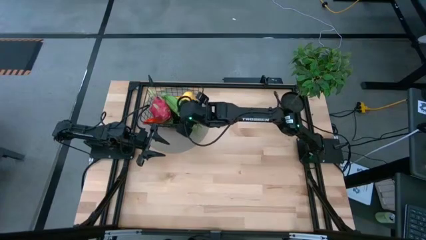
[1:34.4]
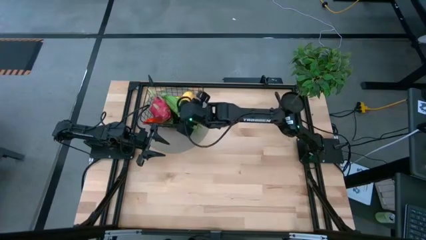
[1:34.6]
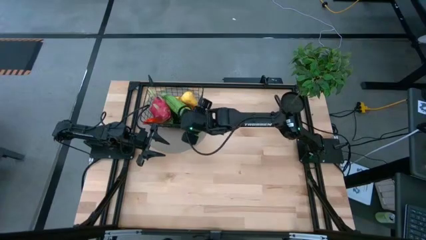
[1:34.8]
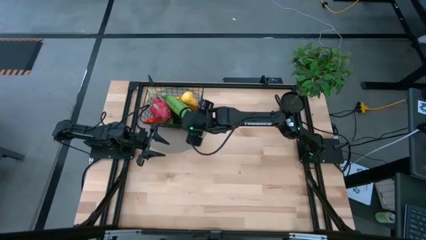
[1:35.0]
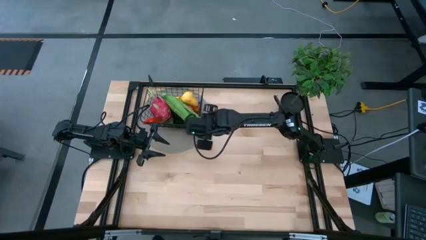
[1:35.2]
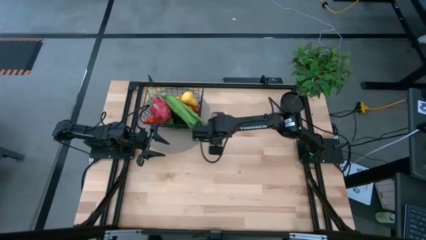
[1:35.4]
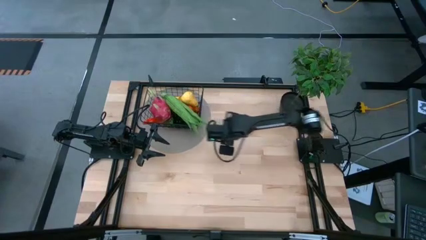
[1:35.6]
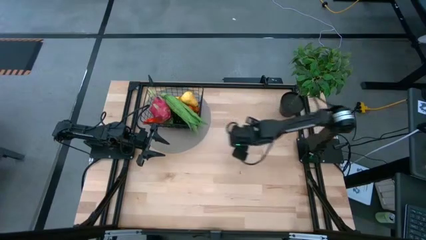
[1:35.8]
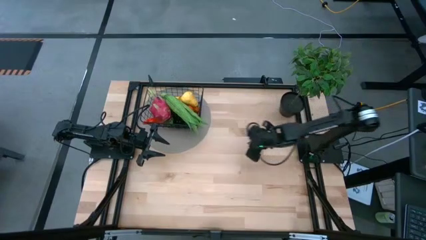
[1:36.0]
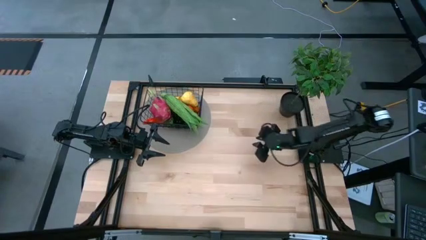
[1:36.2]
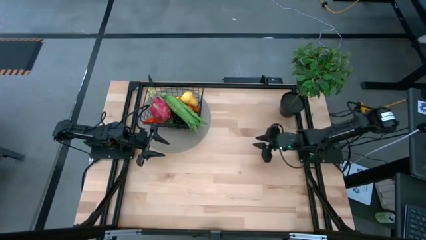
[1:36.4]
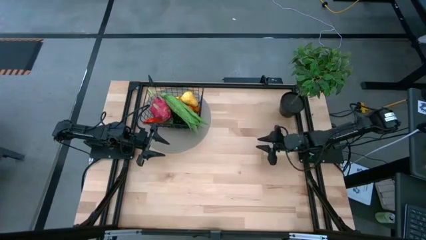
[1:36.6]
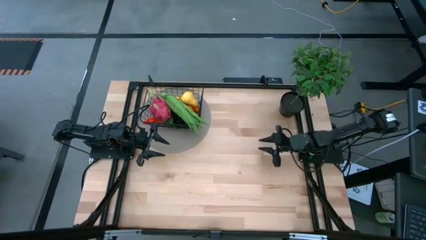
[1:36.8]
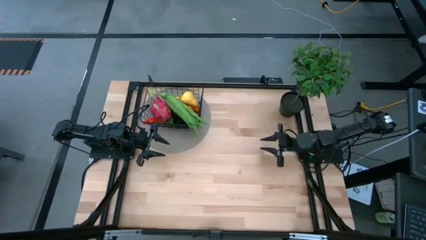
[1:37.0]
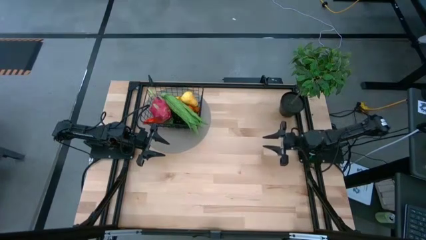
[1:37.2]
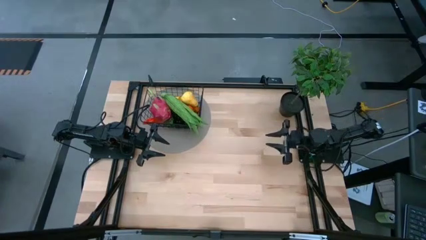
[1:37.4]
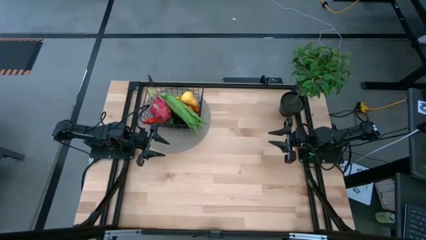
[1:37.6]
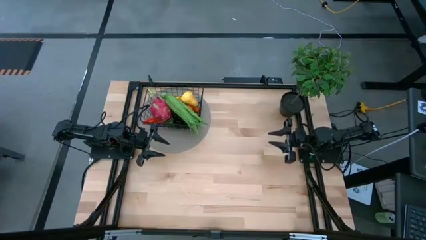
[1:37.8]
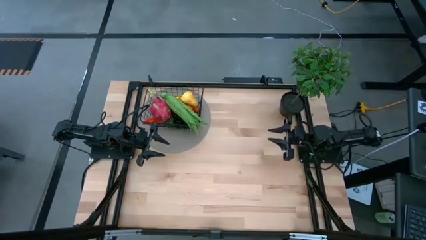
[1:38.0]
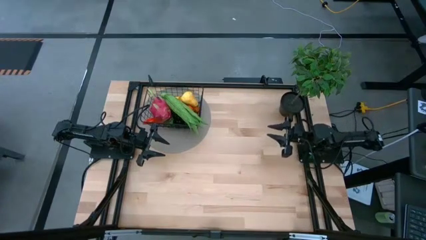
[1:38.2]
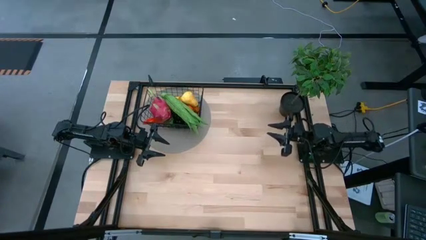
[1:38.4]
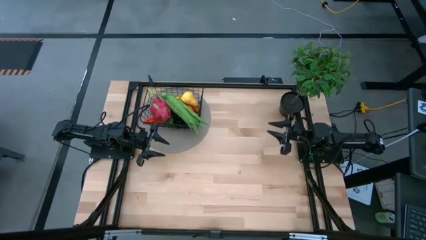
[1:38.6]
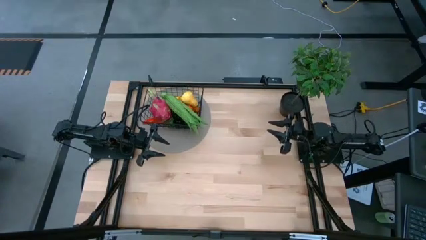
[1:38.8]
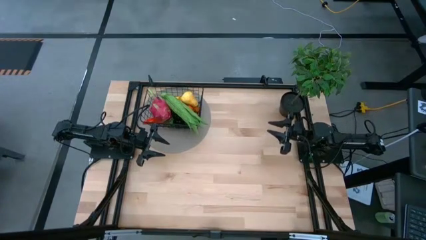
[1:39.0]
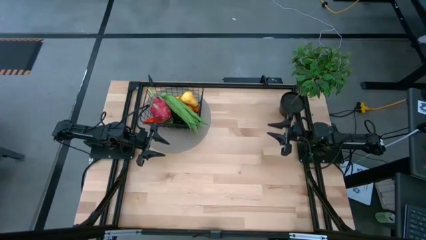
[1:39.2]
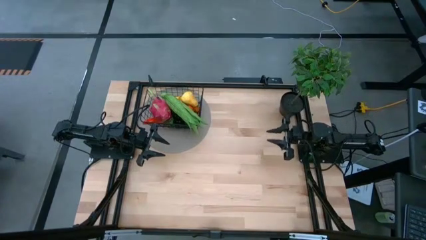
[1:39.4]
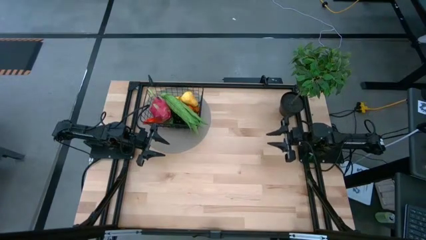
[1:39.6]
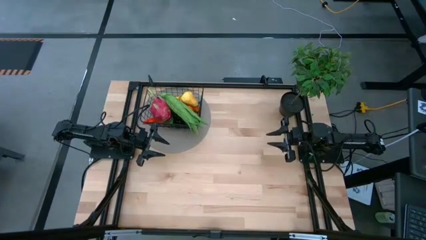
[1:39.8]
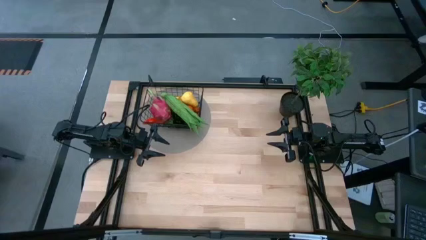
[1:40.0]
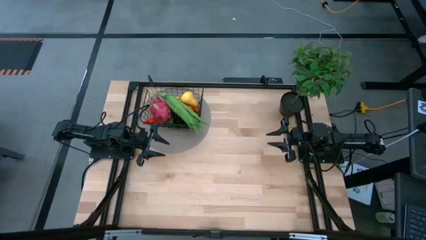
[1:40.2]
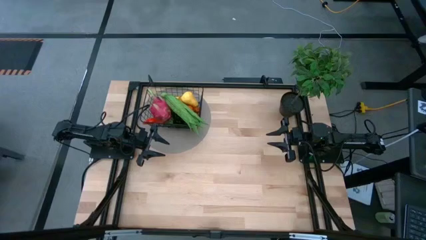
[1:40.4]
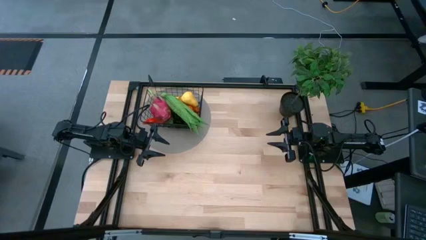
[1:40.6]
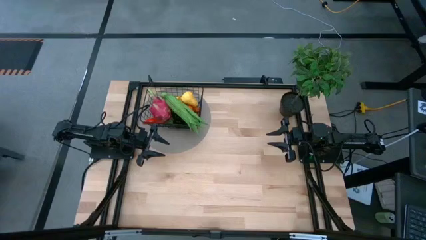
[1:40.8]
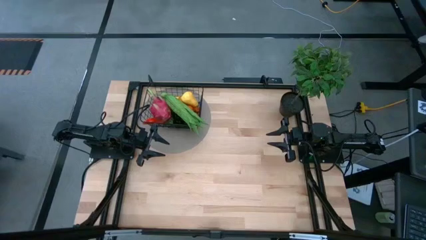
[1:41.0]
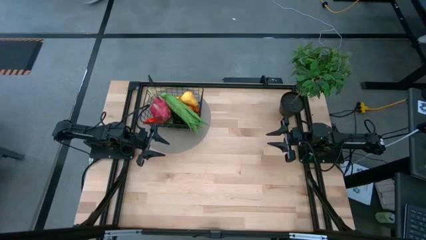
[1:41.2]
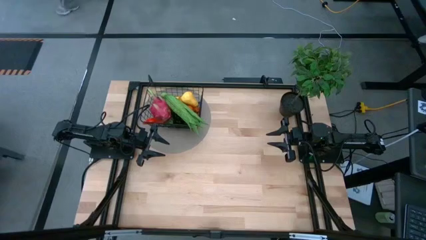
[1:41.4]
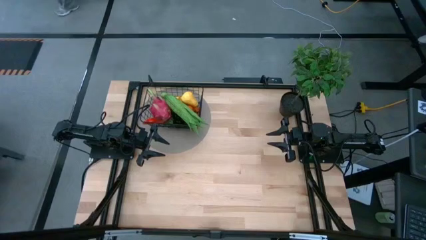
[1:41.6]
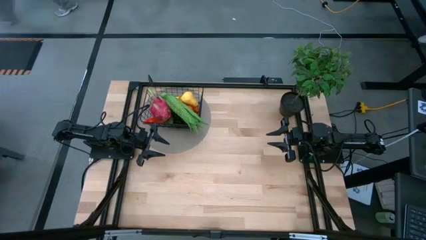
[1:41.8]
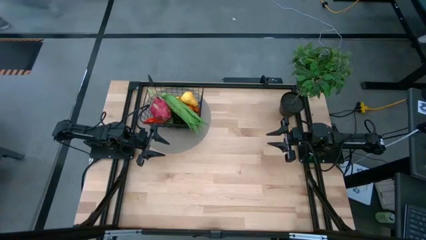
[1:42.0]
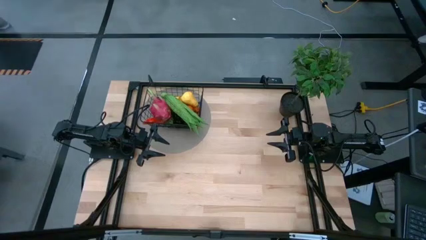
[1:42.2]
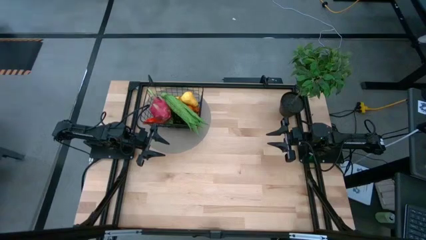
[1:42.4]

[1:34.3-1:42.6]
Task: Build produce basket
Return to Home Position

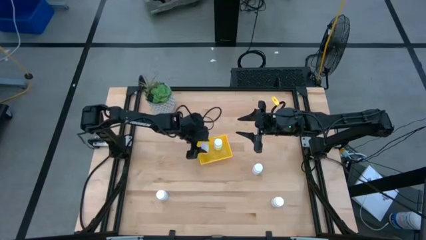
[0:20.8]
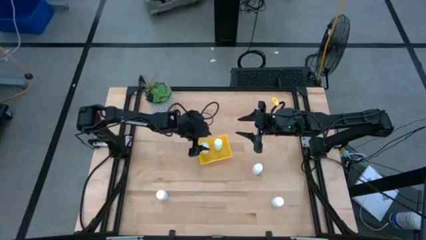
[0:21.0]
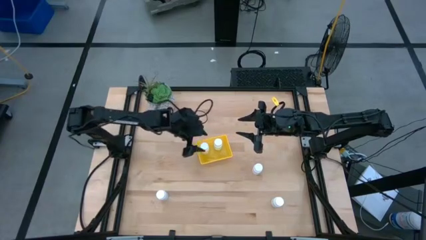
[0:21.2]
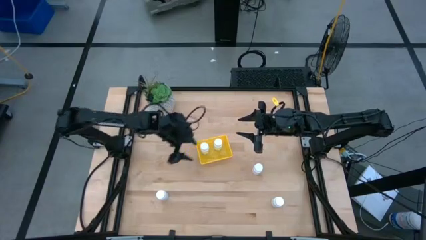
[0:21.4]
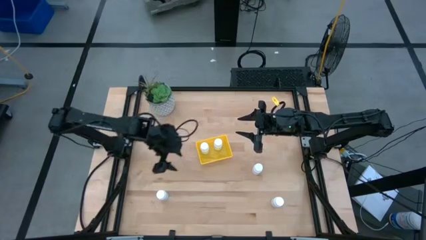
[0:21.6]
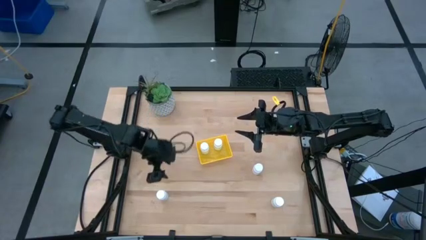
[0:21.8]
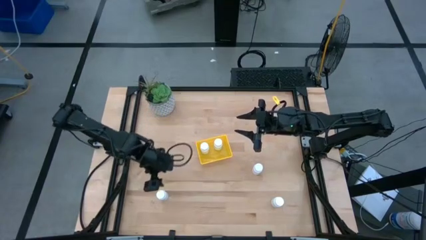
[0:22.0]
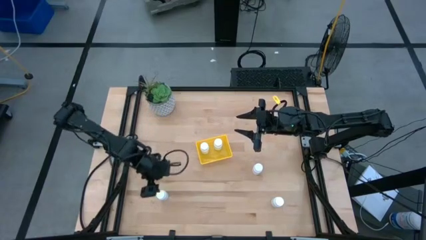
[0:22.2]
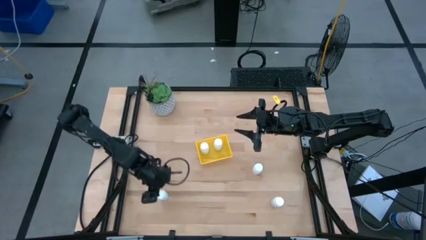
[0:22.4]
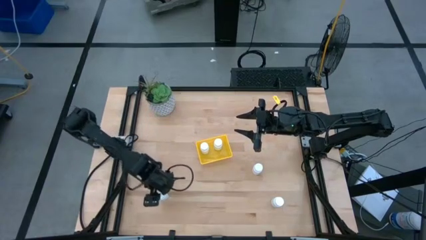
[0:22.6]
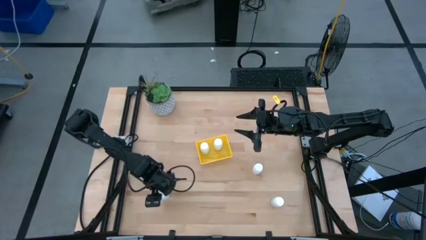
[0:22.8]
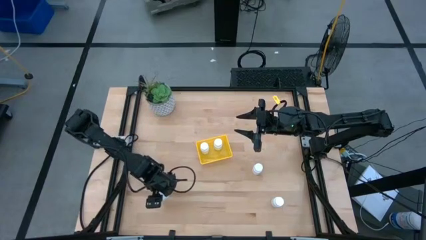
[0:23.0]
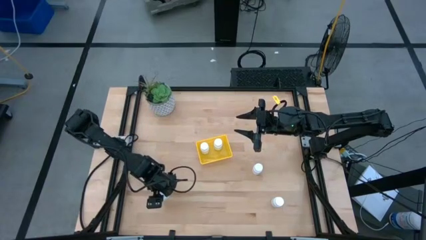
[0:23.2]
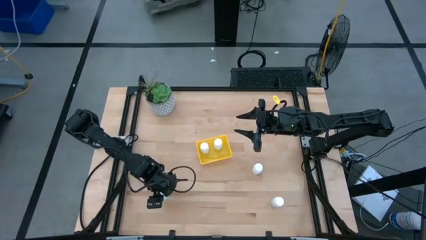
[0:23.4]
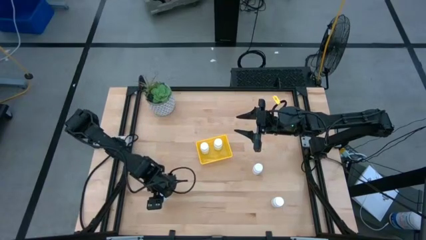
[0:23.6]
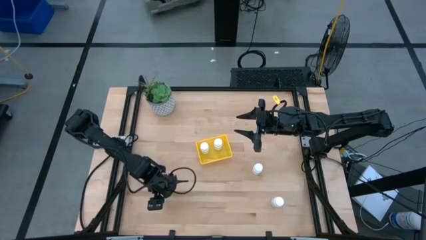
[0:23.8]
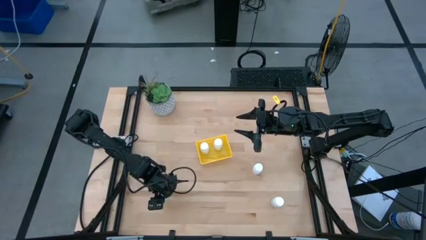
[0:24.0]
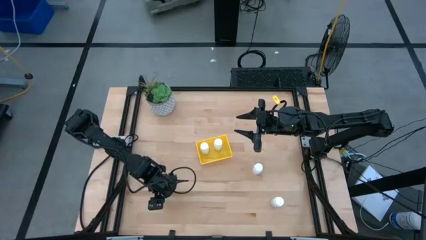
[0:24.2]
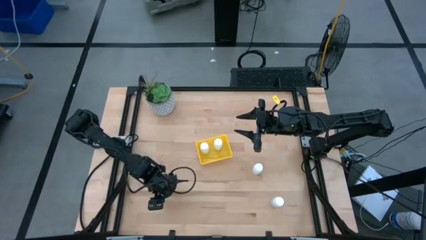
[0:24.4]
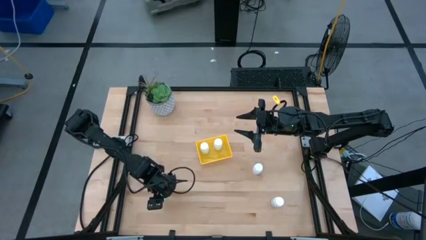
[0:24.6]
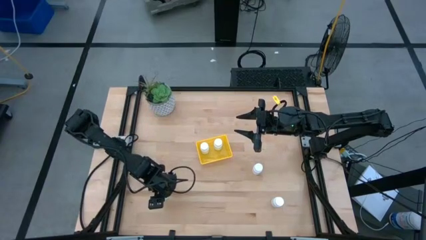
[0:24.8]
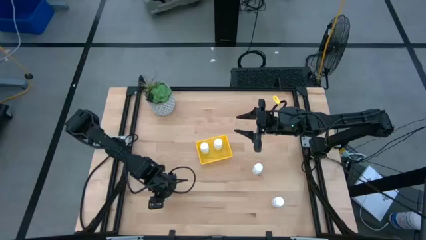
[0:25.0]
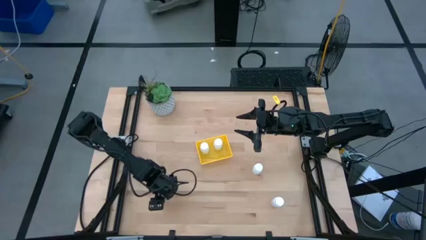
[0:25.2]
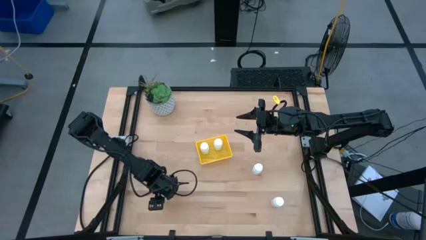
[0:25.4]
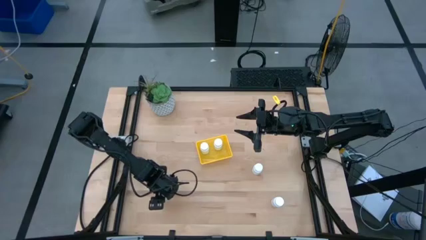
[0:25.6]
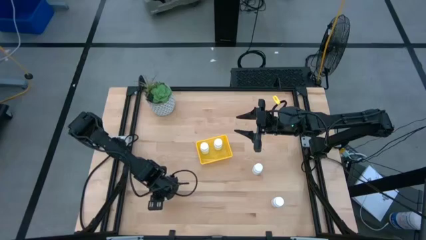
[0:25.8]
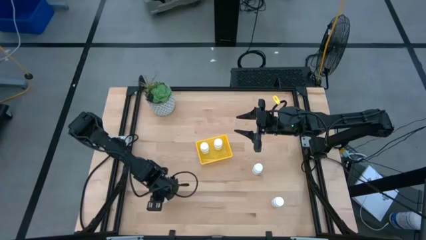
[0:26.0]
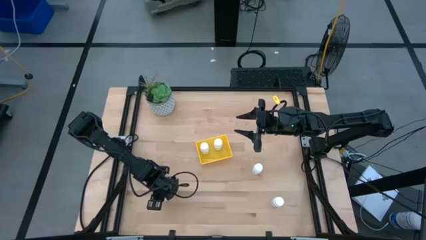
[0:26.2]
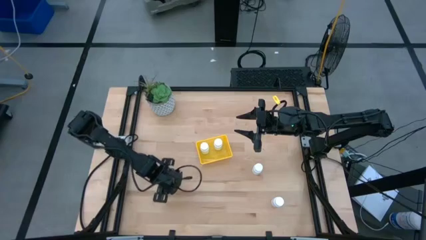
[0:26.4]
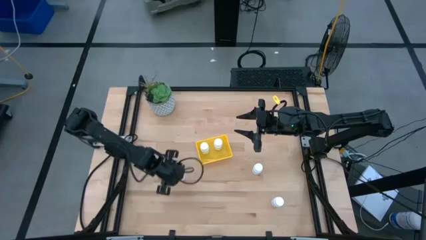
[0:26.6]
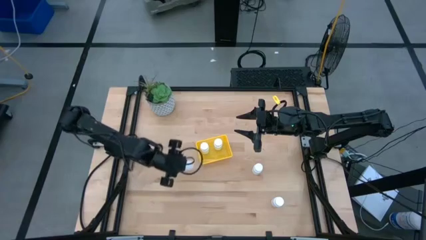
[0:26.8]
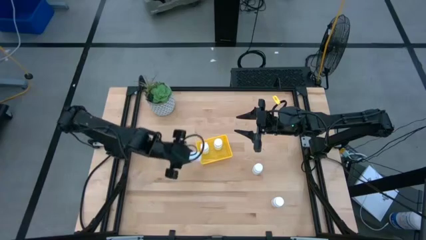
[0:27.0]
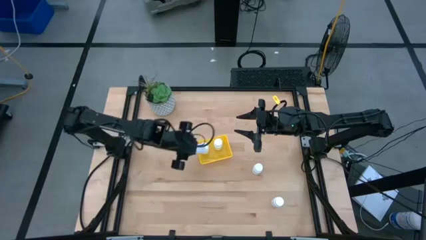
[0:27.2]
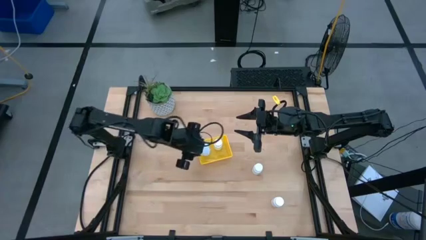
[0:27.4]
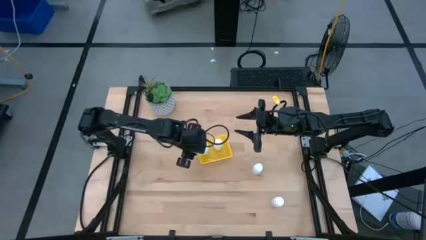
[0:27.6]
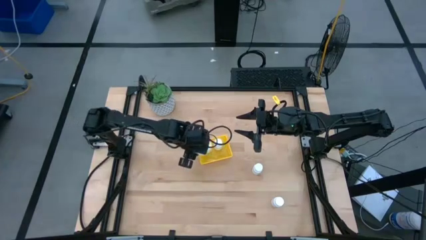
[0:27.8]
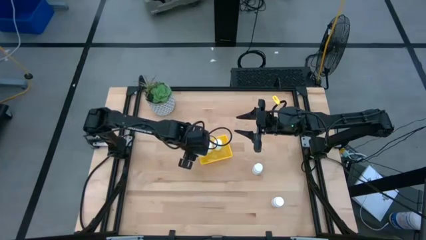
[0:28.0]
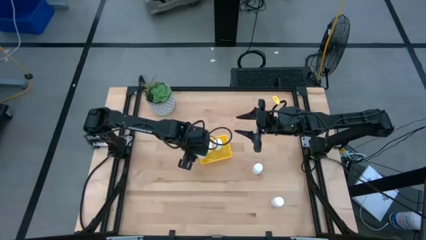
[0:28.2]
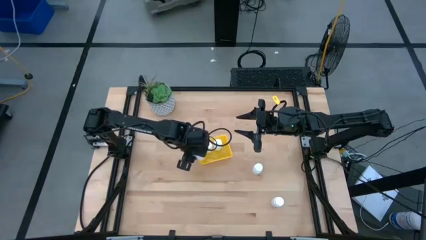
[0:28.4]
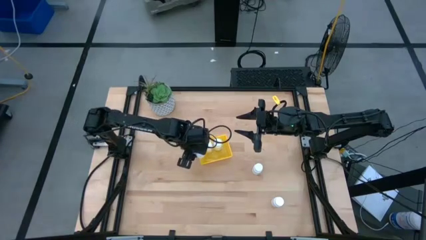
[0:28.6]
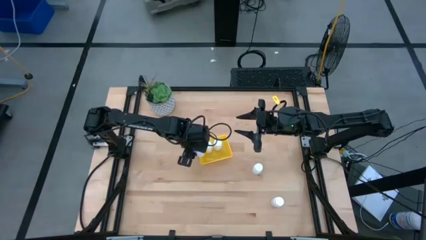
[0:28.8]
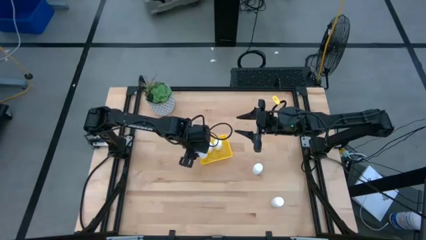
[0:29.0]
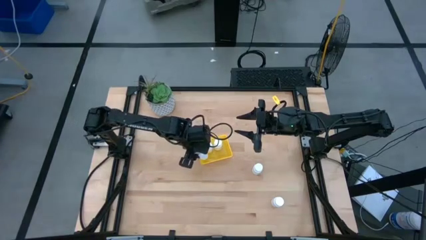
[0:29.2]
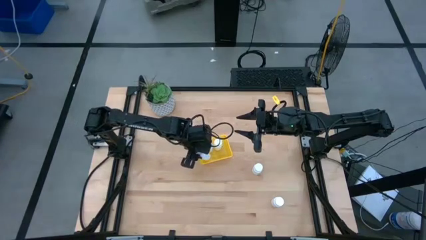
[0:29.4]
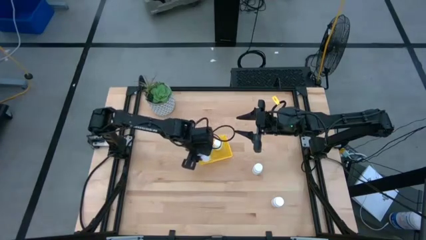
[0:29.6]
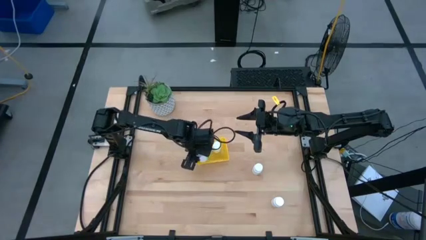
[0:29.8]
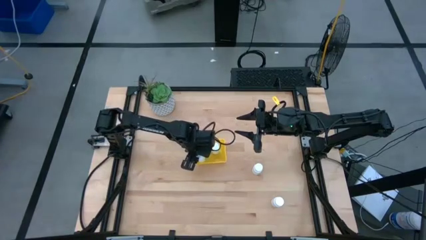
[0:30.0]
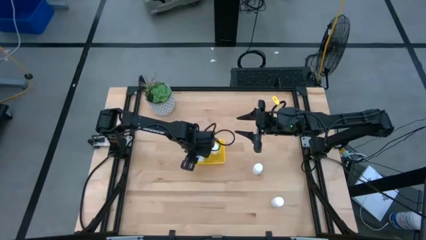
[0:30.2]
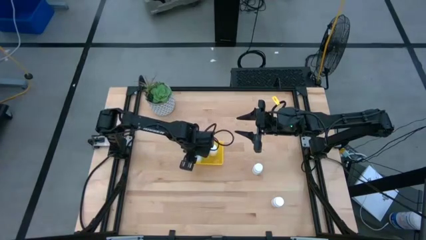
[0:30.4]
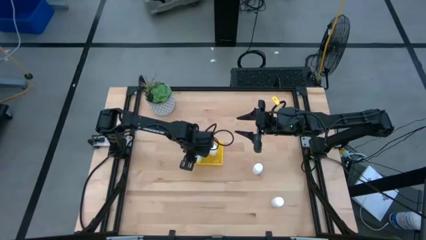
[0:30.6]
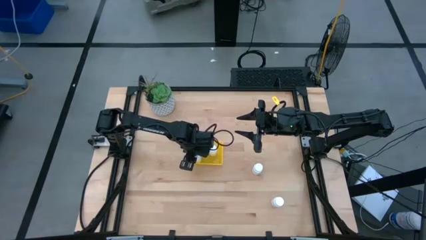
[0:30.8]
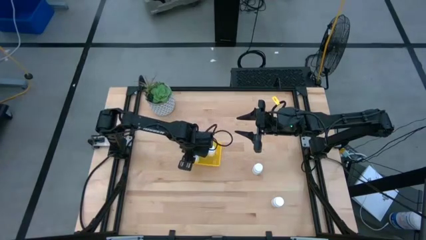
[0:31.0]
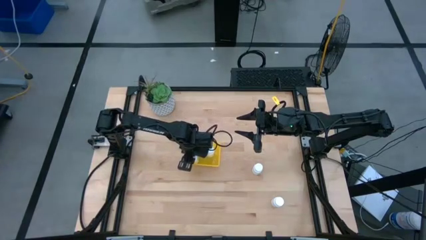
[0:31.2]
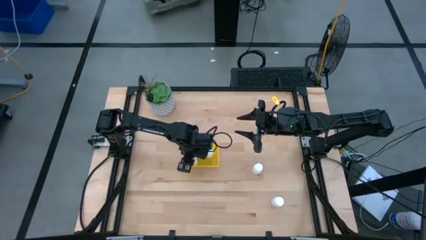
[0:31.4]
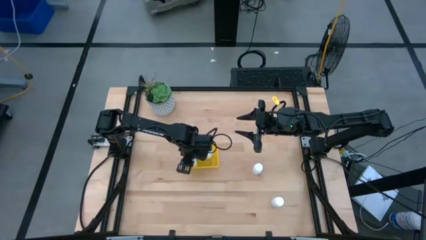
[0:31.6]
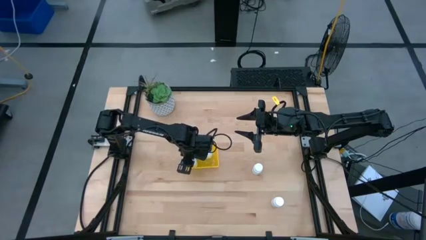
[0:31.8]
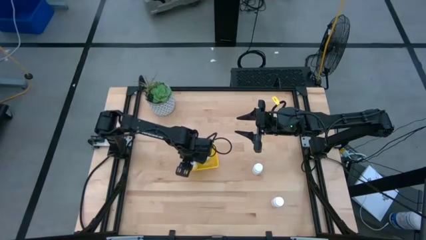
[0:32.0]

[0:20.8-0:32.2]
Task: Pick and place pill bottles into a basket
Put the white medicine bottle into the yellow bin
